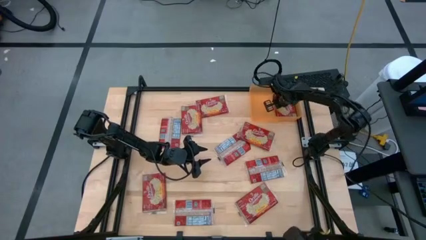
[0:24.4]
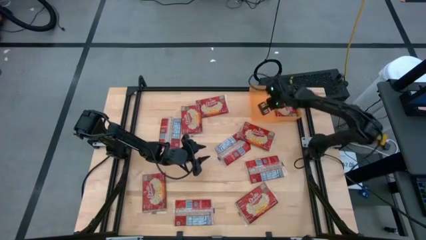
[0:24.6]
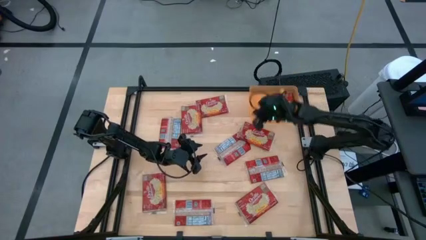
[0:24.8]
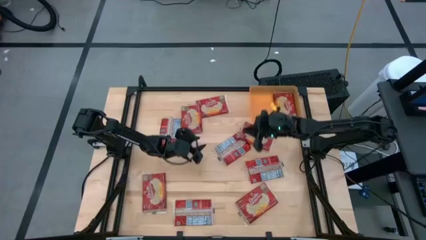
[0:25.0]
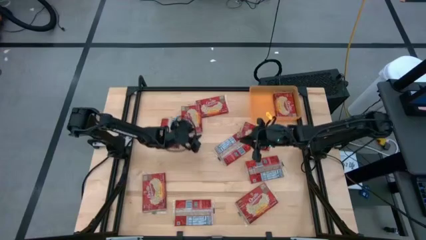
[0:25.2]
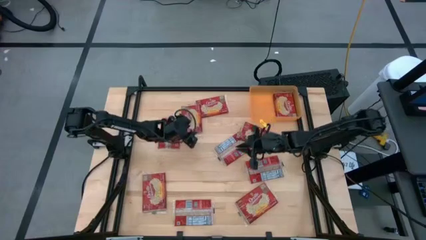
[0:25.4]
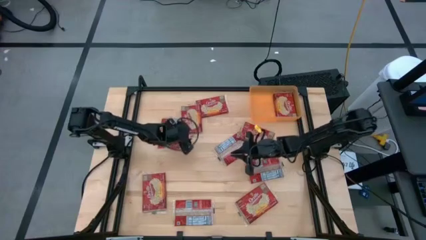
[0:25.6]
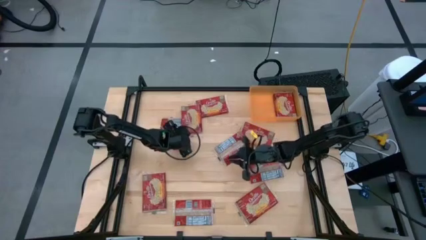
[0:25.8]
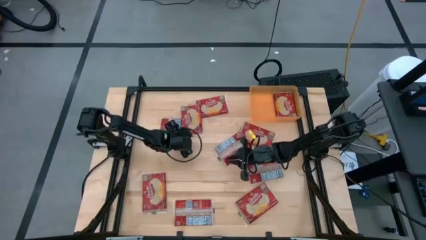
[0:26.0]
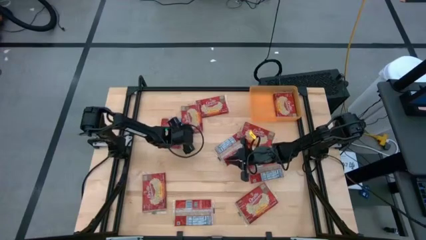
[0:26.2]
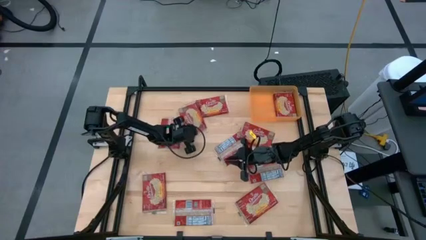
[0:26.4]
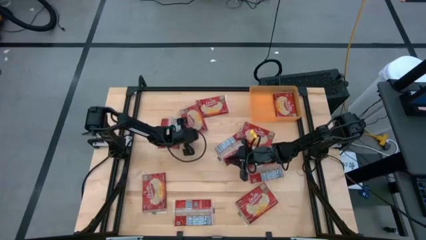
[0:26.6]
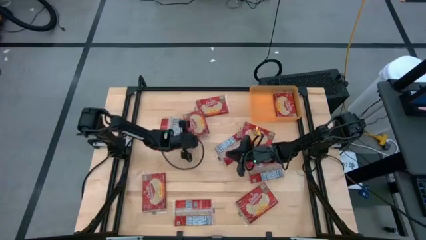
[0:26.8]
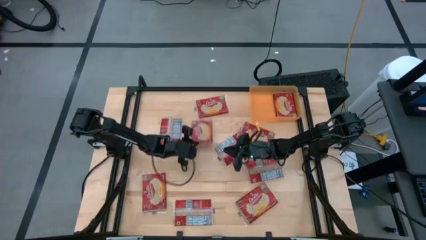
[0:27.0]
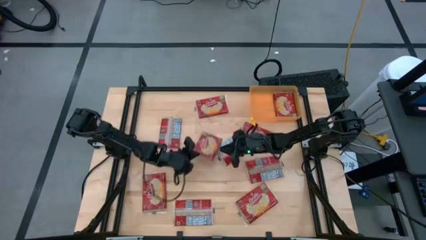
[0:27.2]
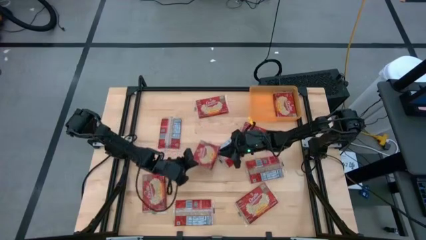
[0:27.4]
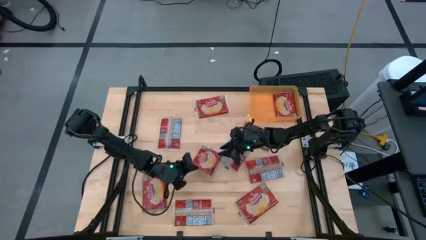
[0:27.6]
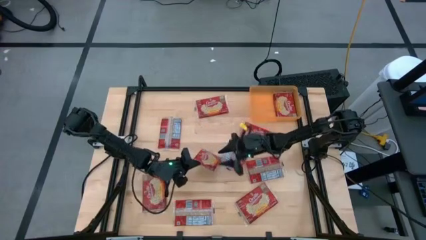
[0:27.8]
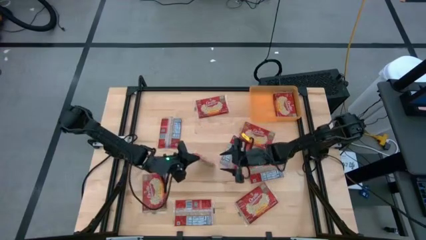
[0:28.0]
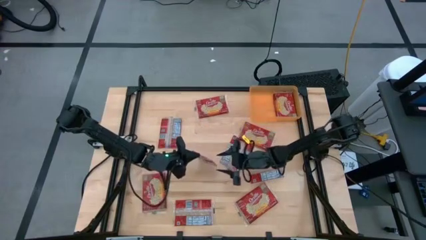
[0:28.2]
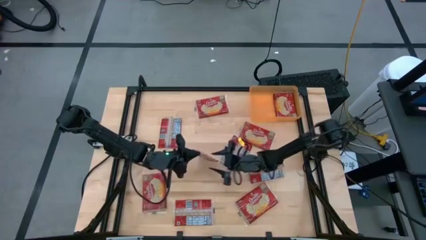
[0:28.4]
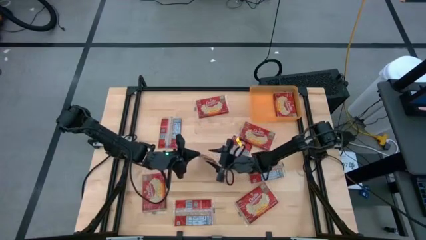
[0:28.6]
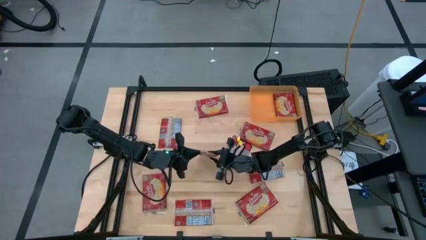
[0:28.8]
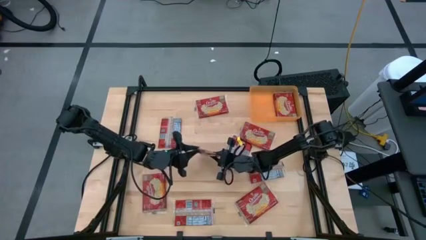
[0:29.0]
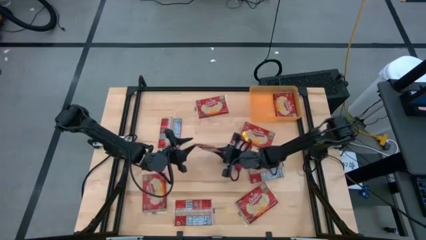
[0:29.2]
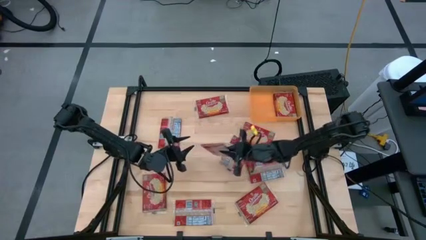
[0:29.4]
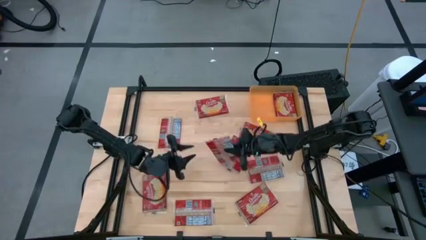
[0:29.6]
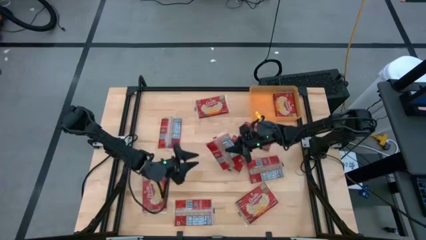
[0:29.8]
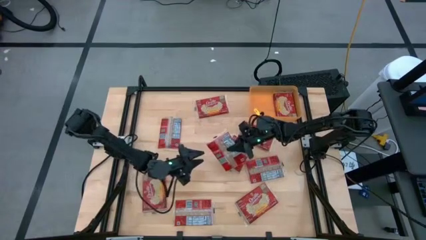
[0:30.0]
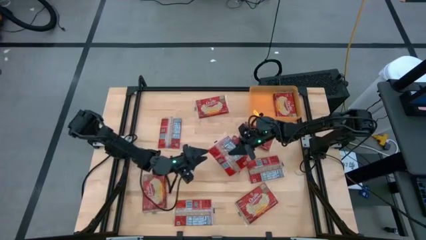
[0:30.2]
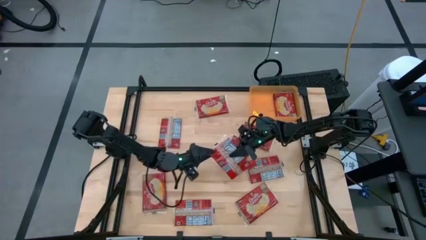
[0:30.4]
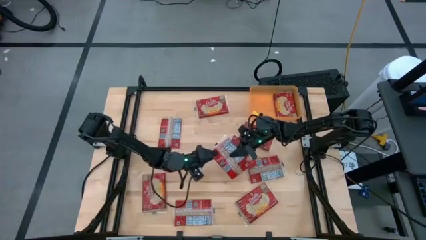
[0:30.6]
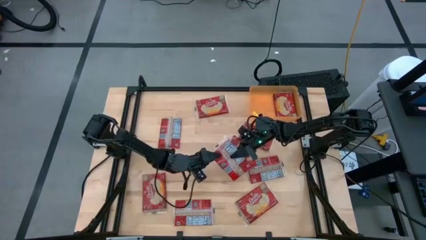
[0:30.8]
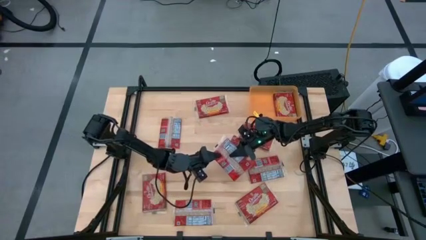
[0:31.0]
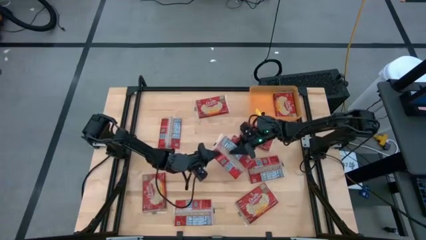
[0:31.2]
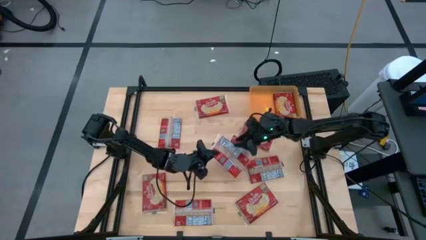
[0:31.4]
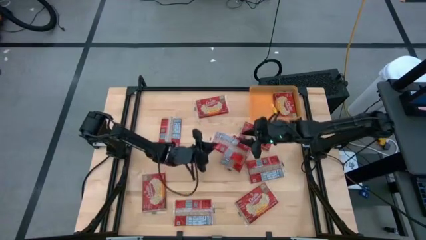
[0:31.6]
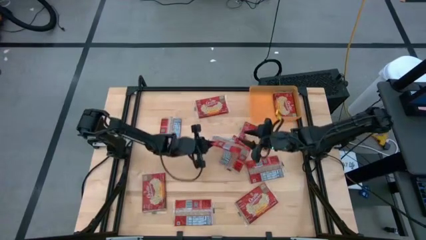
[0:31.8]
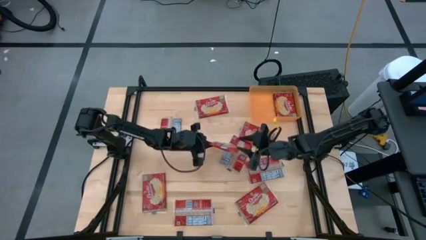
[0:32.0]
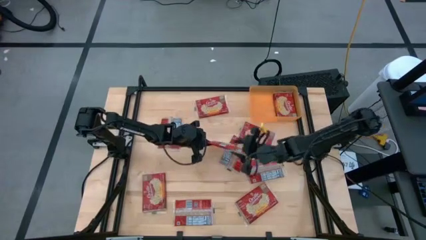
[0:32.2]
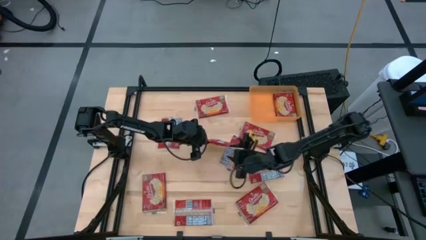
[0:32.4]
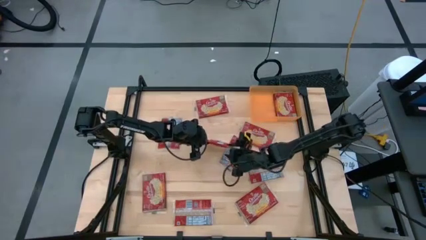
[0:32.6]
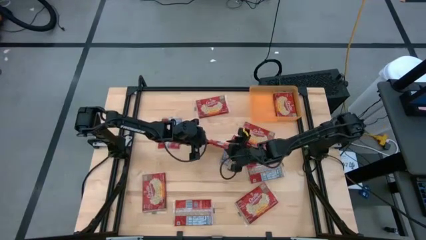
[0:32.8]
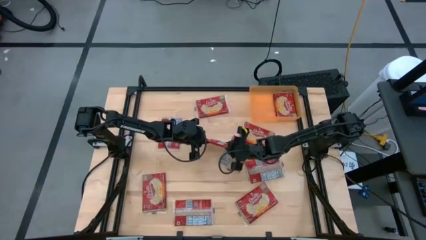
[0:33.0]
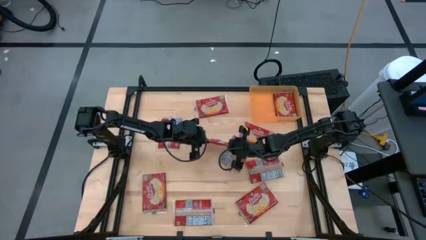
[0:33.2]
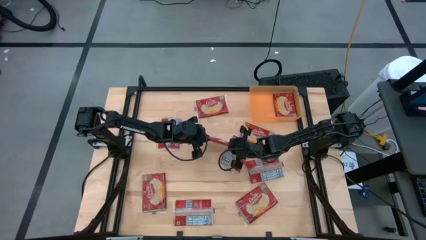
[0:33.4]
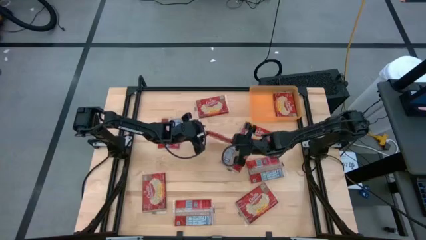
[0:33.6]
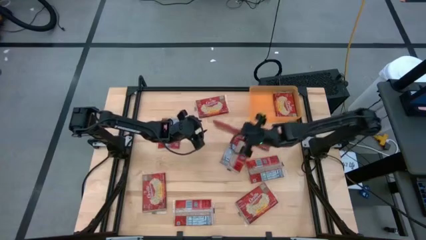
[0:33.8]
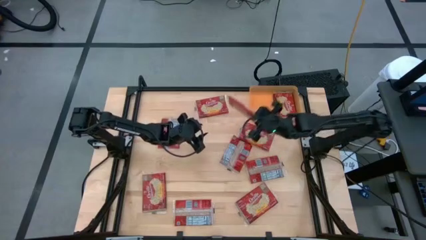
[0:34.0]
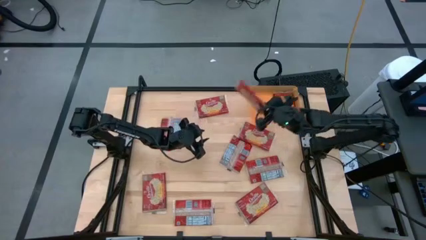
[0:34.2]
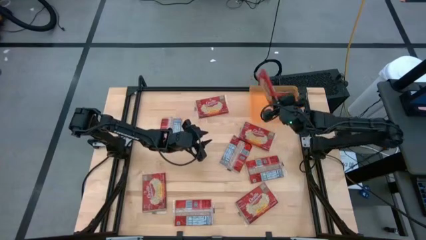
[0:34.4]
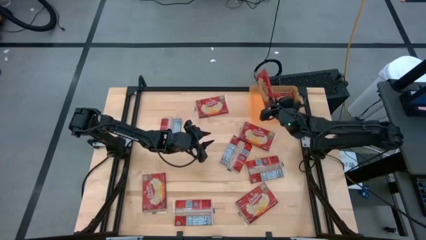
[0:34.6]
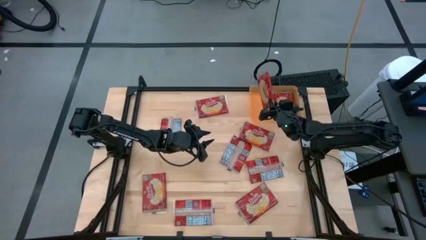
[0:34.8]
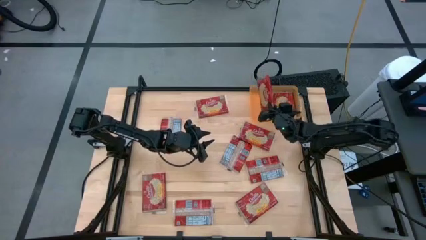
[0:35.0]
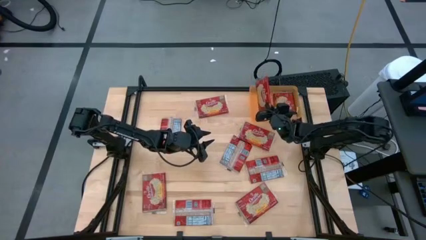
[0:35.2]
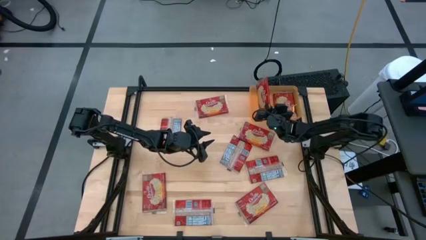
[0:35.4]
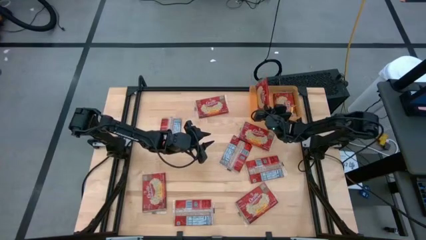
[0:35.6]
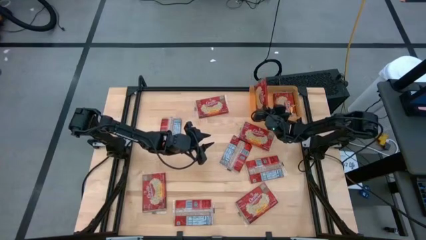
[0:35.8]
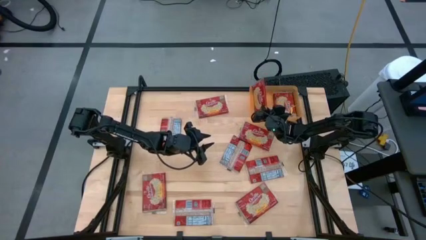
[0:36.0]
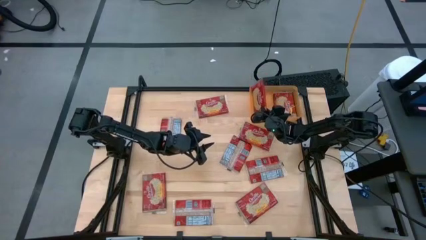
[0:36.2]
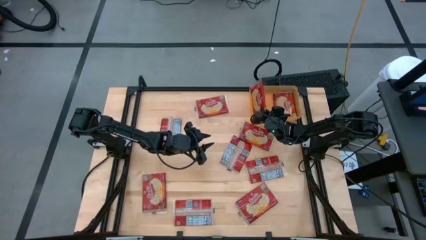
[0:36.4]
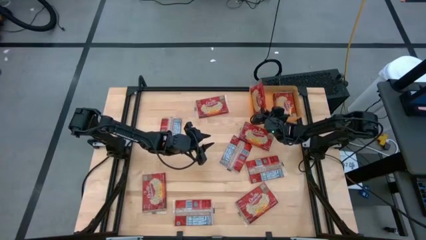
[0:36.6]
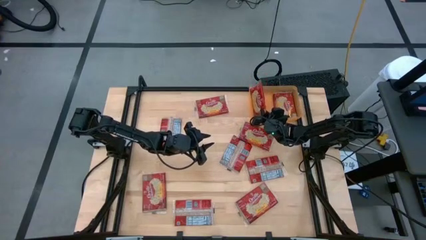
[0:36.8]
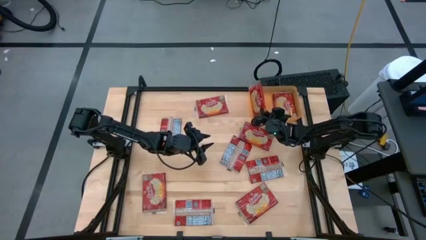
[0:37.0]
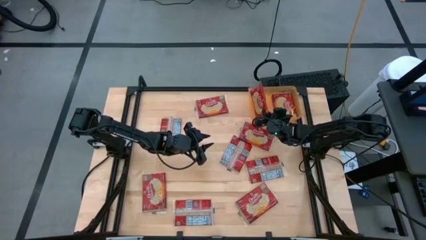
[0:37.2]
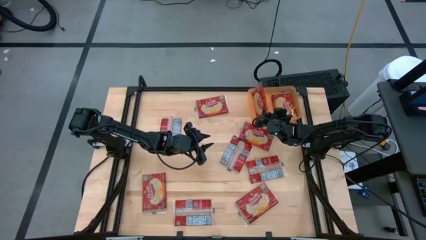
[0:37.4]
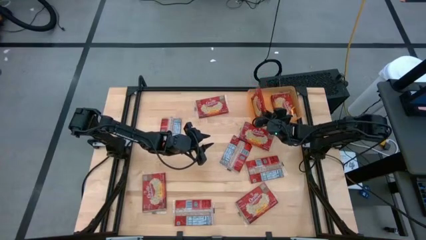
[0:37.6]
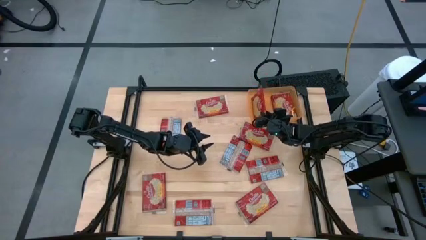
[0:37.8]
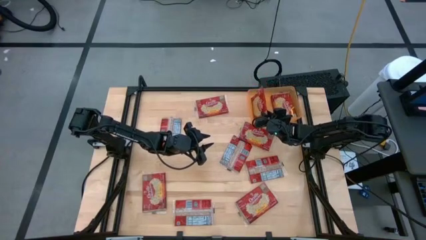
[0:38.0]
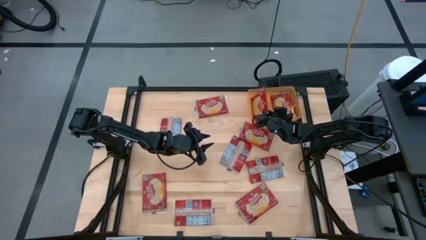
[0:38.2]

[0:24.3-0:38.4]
Task: Sort popcorn bags into baskets
Put the red popcorn bag into the orange bin

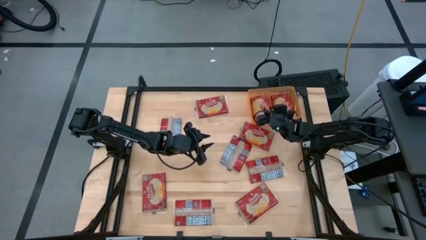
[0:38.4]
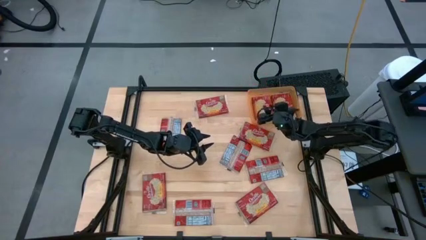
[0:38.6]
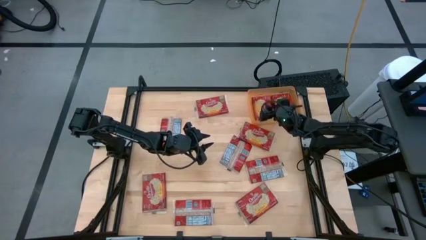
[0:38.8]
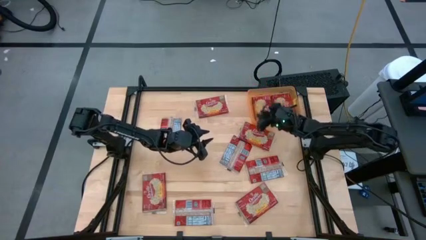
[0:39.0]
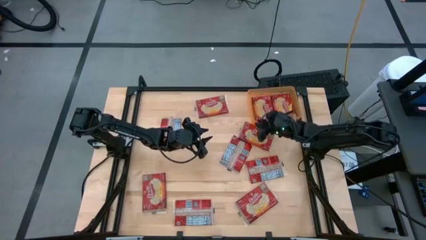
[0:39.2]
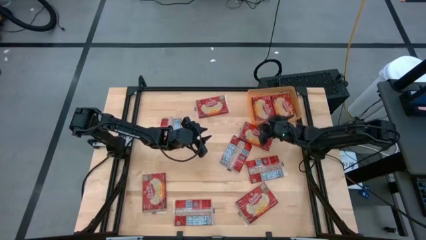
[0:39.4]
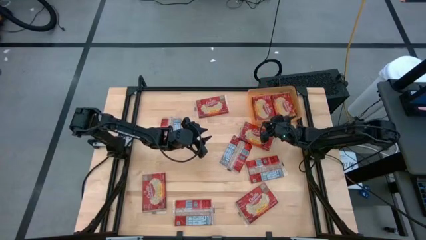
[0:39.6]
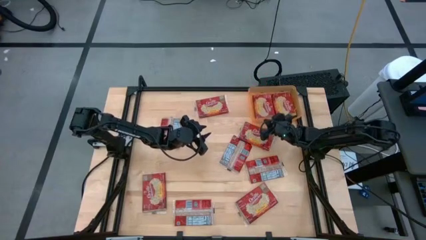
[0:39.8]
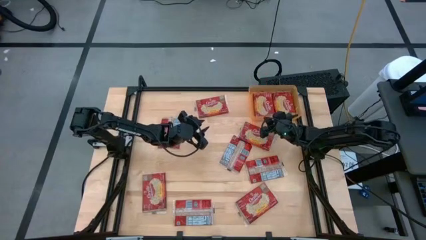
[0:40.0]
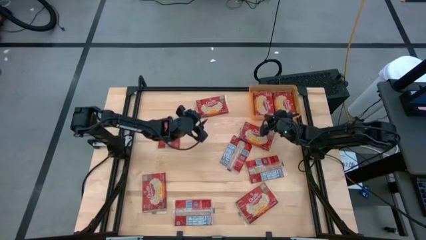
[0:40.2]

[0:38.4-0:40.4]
Adjust the orange bin

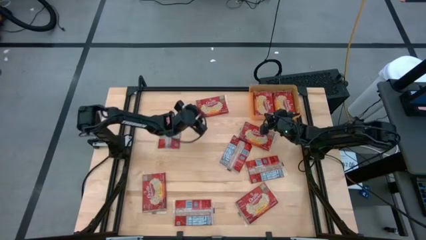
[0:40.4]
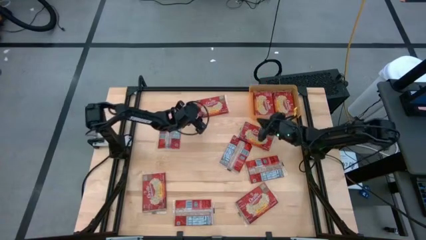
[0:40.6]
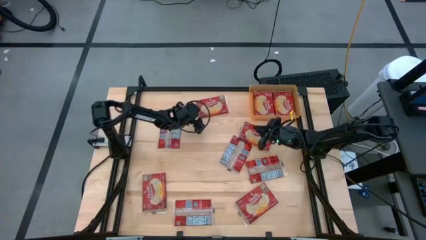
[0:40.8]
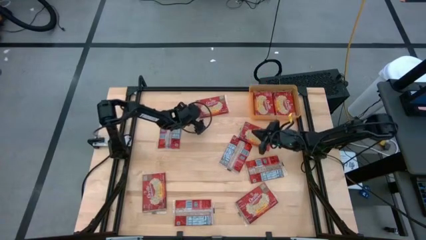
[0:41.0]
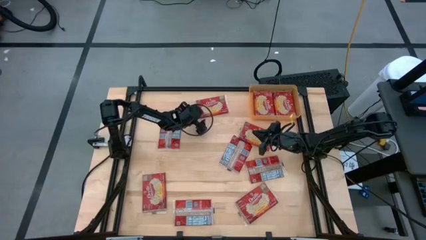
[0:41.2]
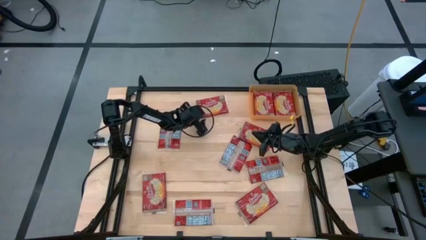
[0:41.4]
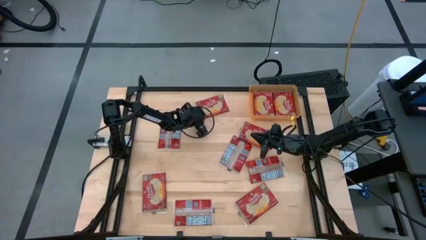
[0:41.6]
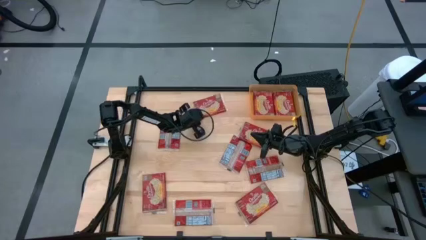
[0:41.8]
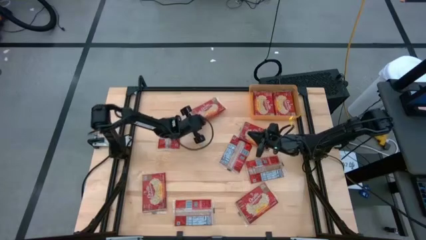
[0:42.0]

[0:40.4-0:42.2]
Put the red popcorn bag into the orange bin
